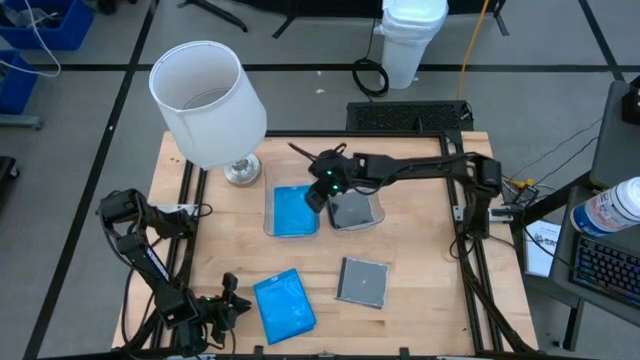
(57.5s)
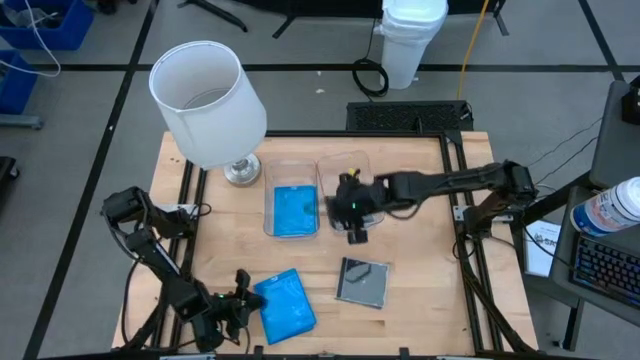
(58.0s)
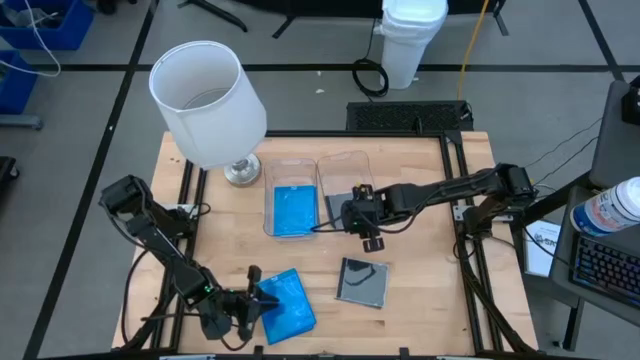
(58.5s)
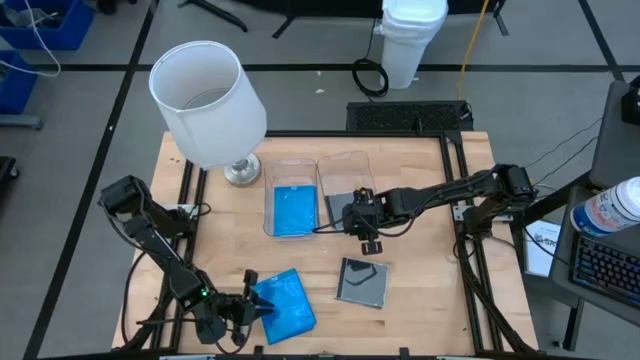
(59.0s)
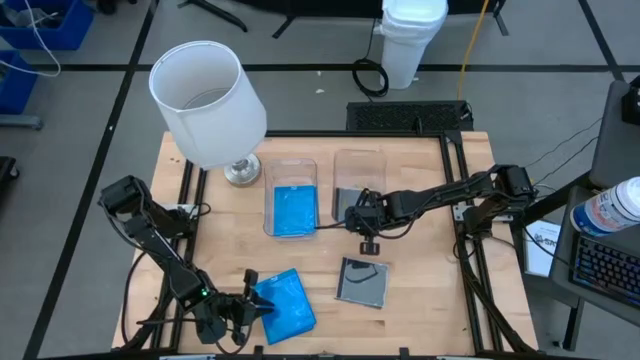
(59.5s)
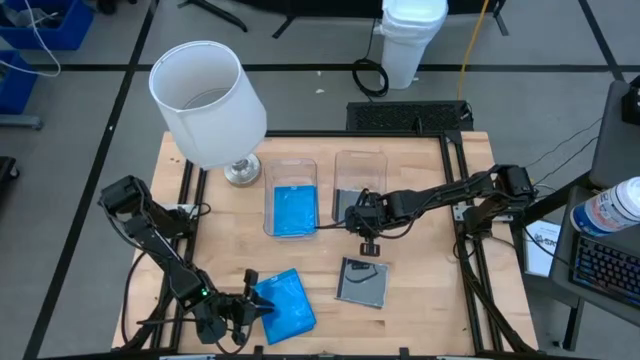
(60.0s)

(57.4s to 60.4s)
Task: Pick & place jewel cases by type
Adjust the right transparent bin on the table

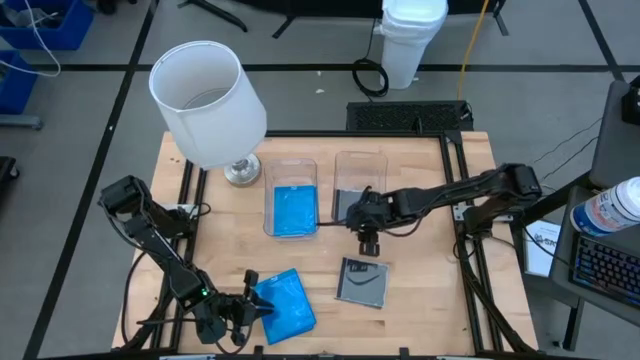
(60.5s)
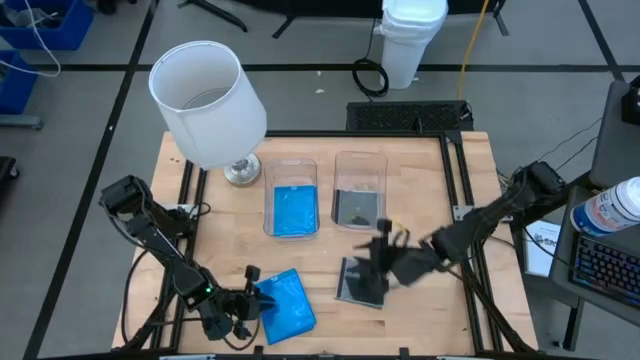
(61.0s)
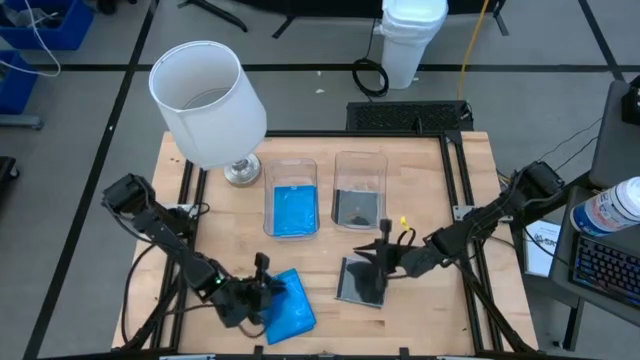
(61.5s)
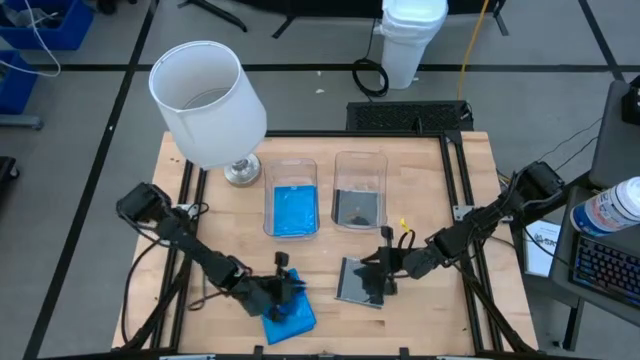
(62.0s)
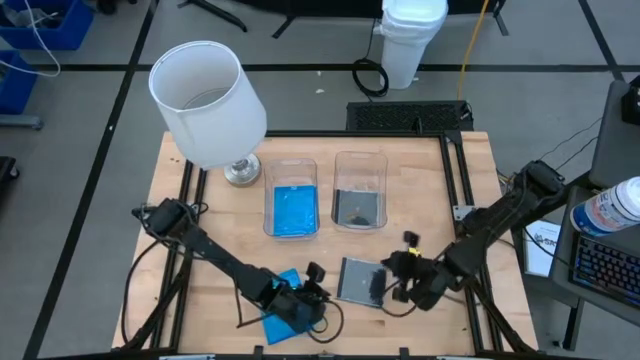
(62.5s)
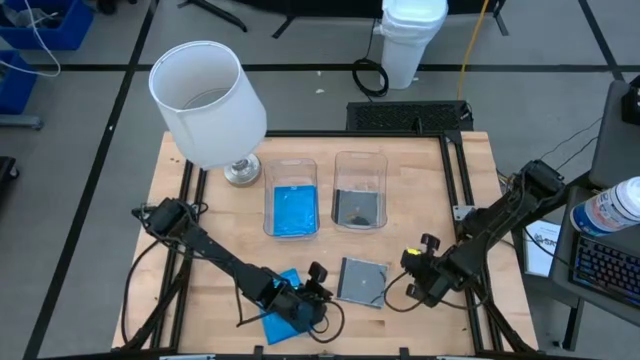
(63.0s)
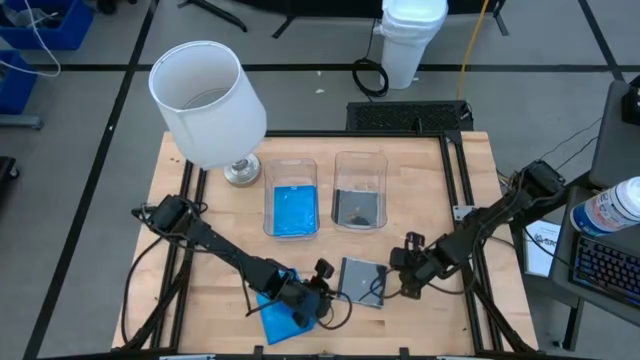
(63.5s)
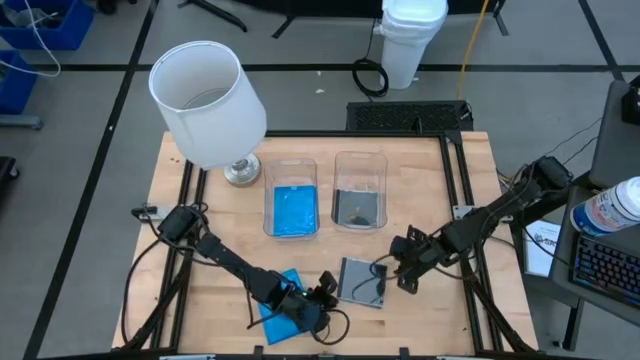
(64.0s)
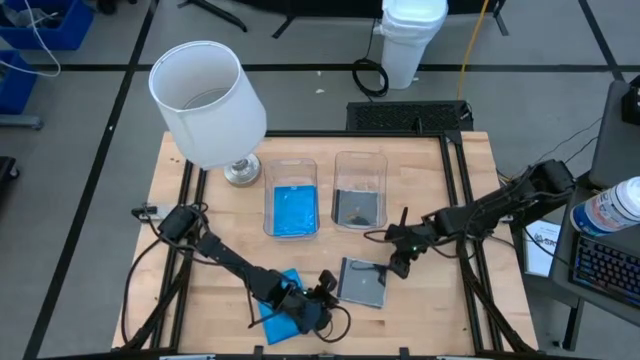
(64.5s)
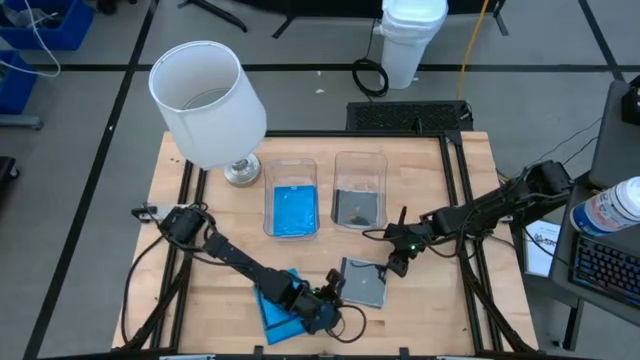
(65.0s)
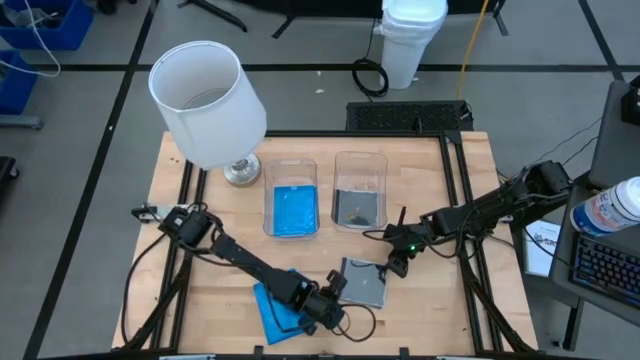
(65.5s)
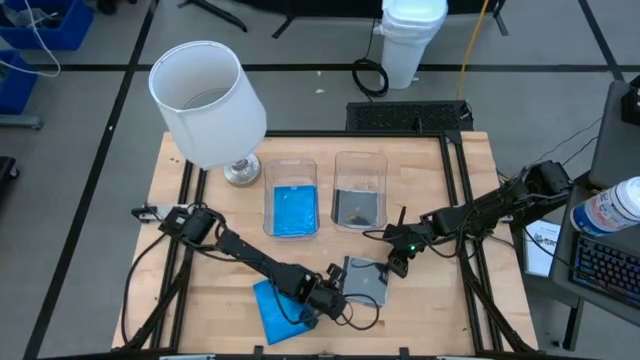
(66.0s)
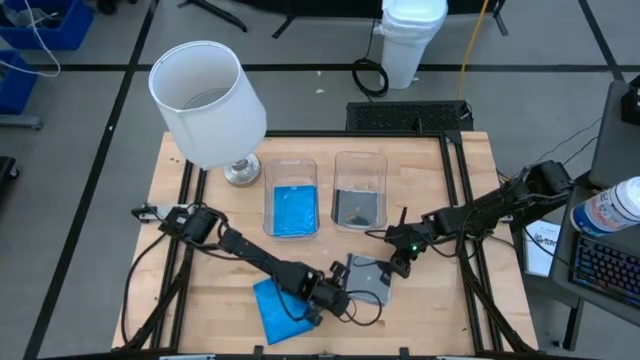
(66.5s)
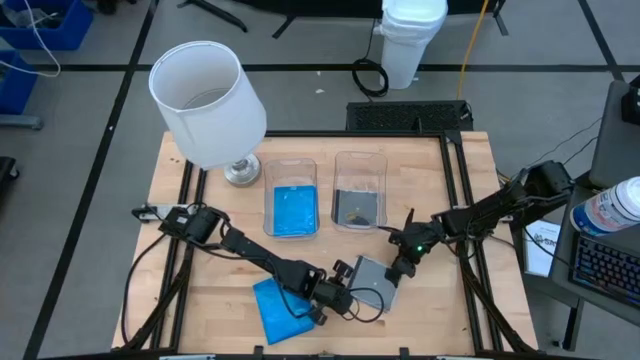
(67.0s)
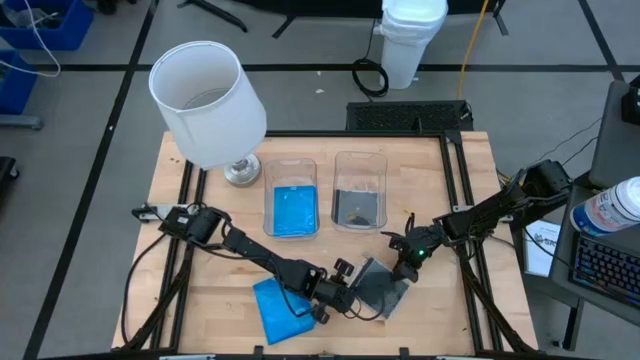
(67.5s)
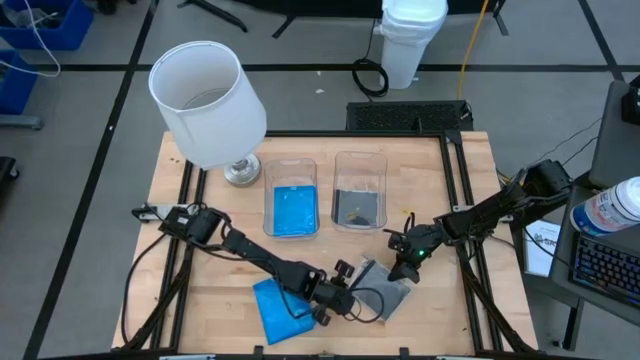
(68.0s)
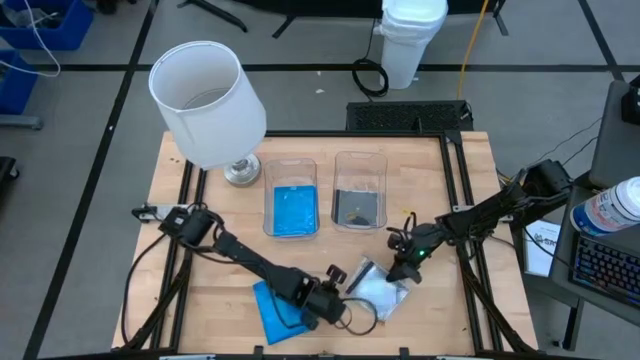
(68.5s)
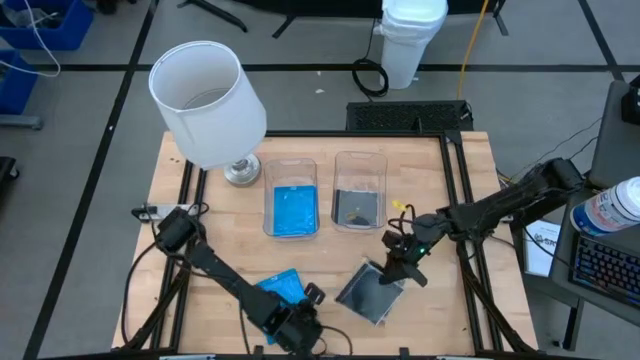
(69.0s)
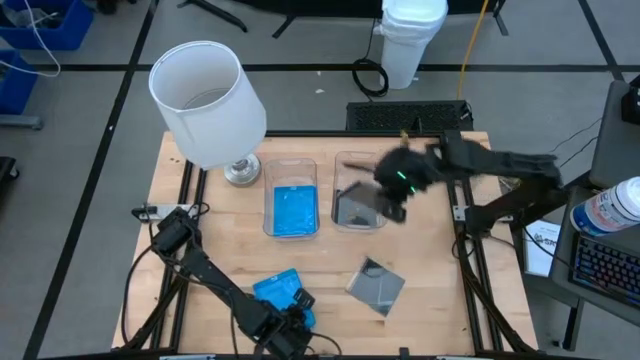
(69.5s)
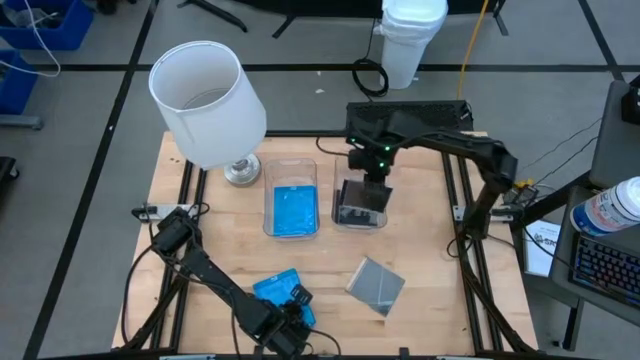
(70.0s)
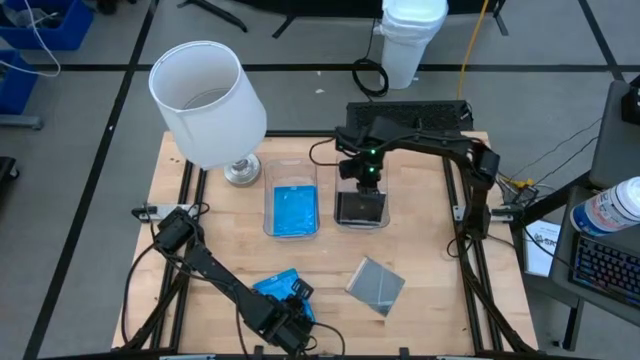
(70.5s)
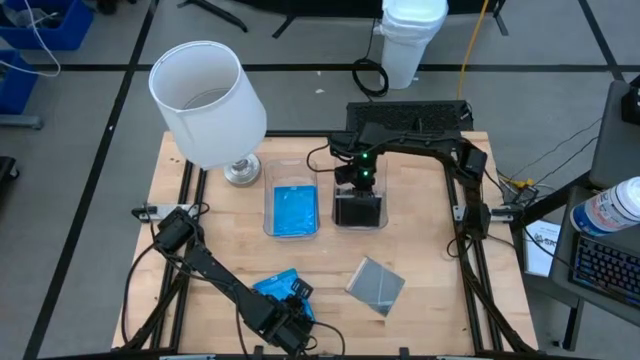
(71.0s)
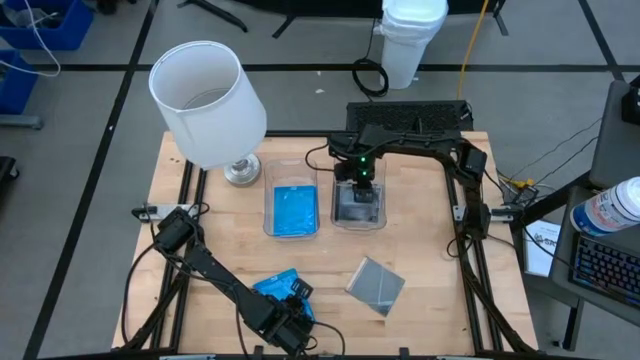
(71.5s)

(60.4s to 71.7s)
Put the black CD case into the right transparent bin

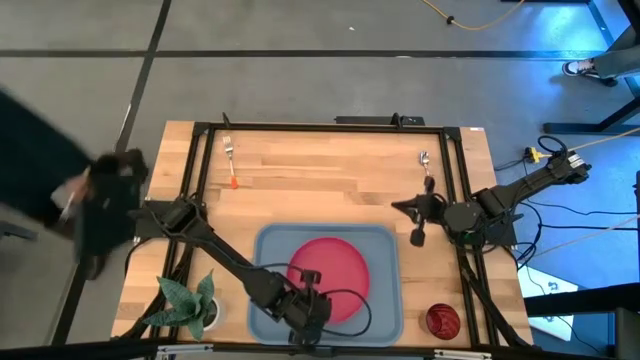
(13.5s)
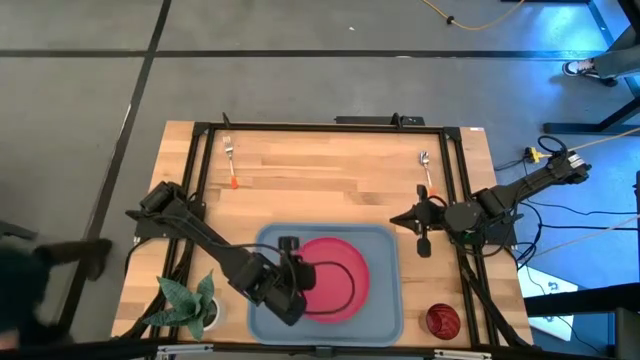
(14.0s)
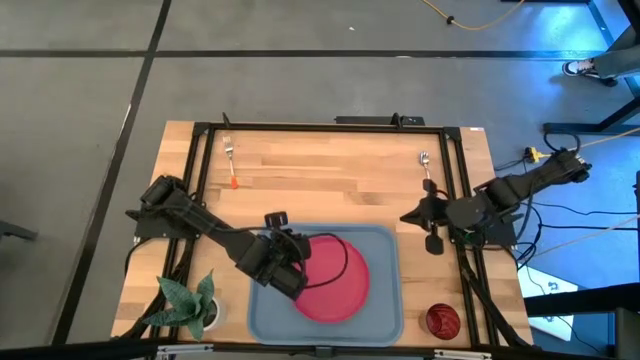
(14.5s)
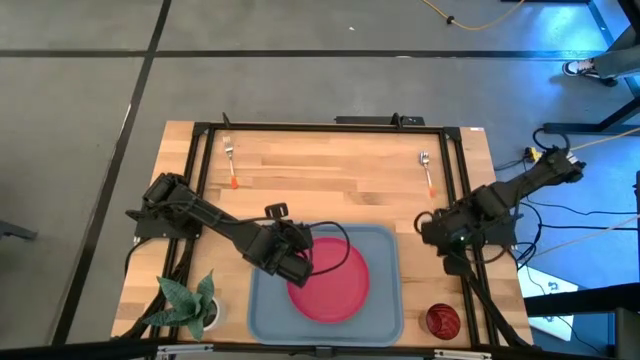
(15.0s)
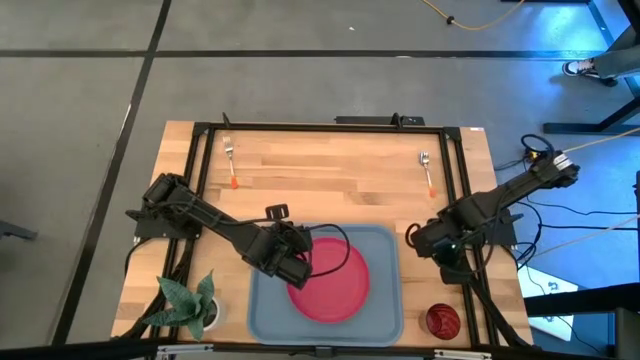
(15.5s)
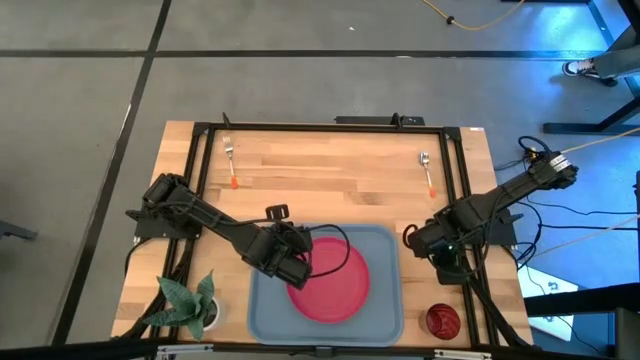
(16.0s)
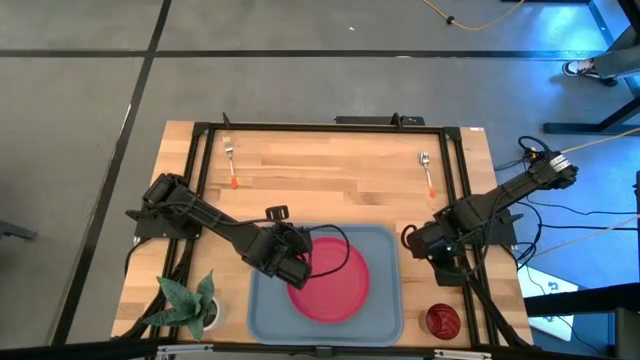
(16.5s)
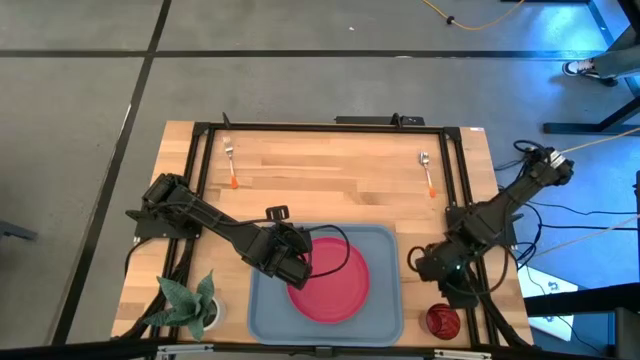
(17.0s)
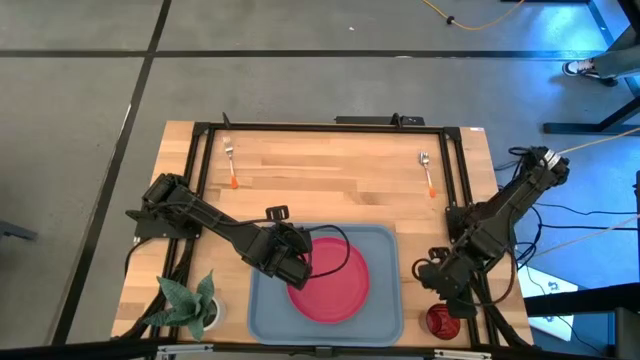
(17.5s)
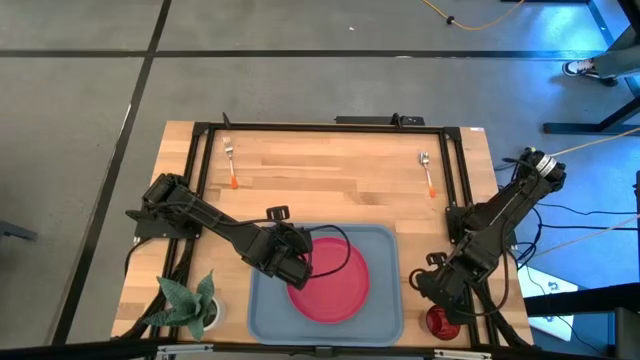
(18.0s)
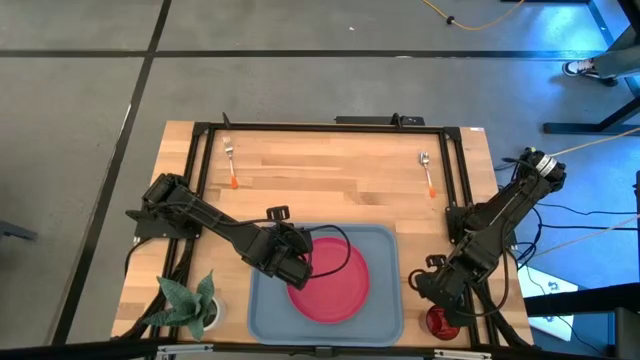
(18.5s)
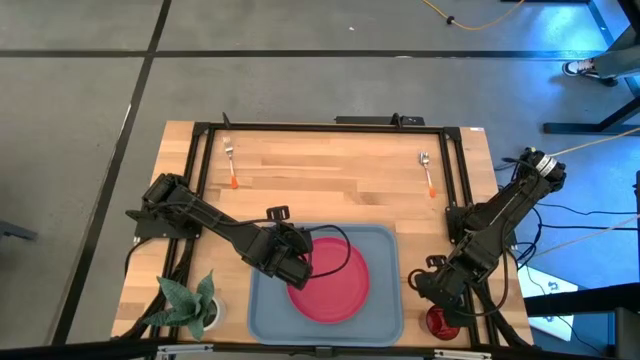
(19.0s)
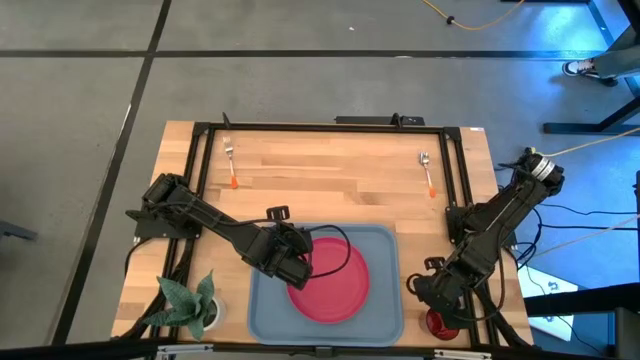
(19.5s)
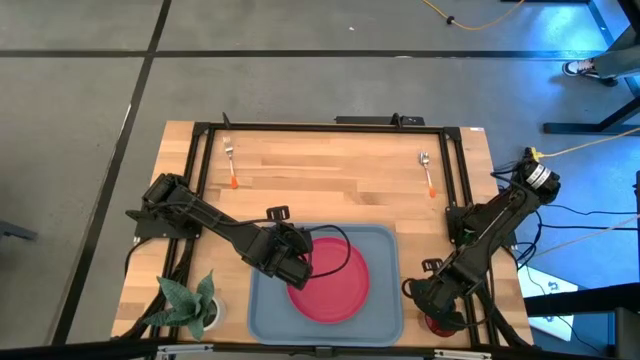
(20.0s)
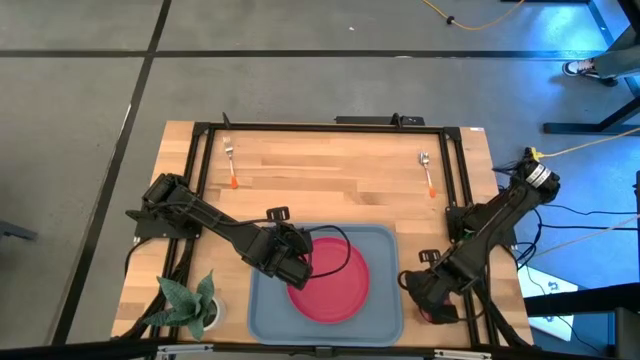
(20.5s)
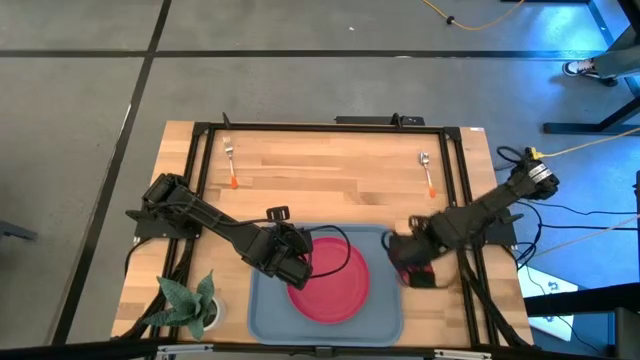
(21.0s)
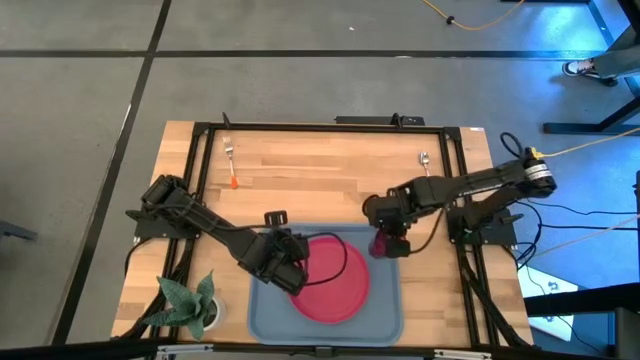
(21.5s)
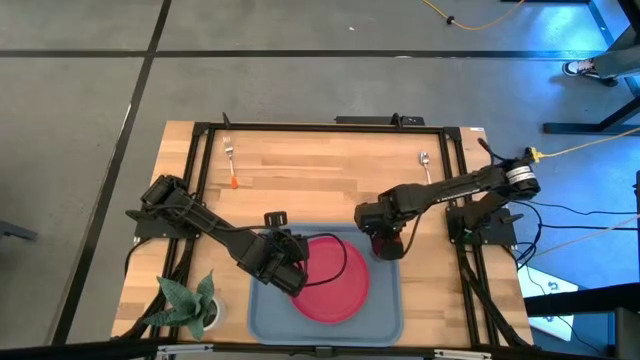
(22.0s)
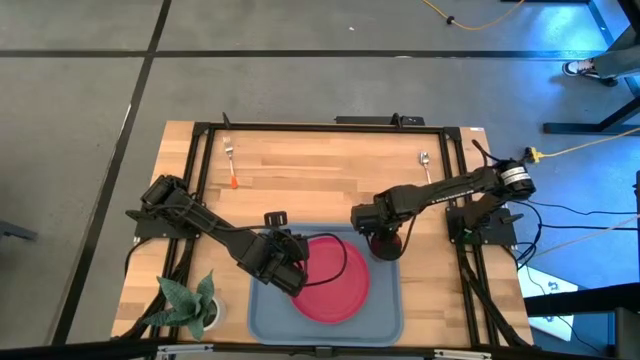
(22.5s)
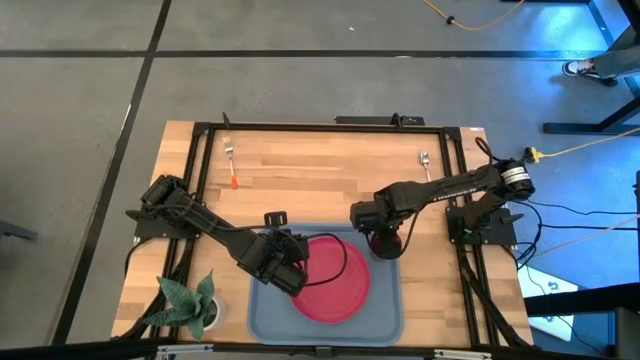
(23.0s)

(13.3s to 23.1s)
Task: Pick and place plate/cup/fork/spoon on tray
Put the red glass on the blue serving tray to the top right of the pink plate
